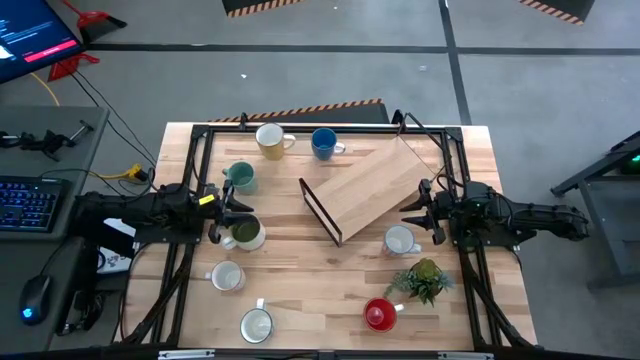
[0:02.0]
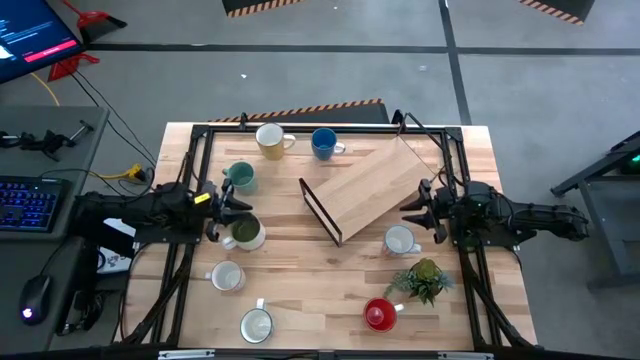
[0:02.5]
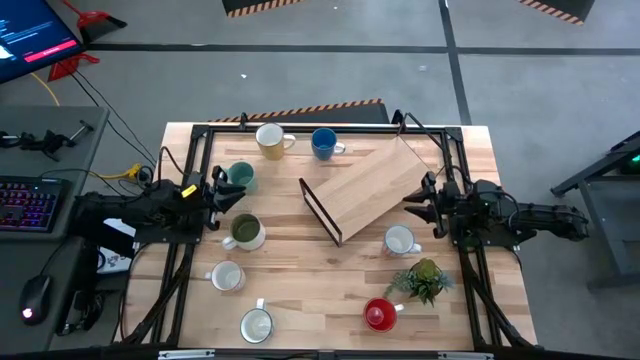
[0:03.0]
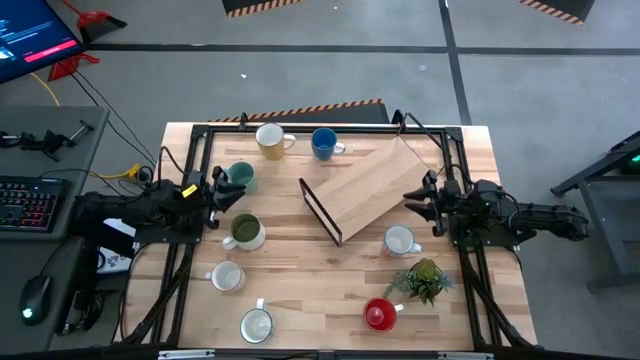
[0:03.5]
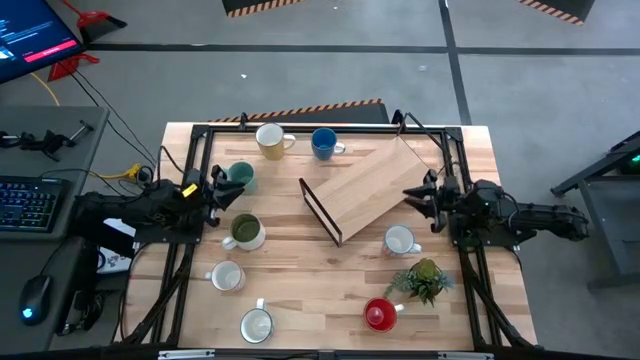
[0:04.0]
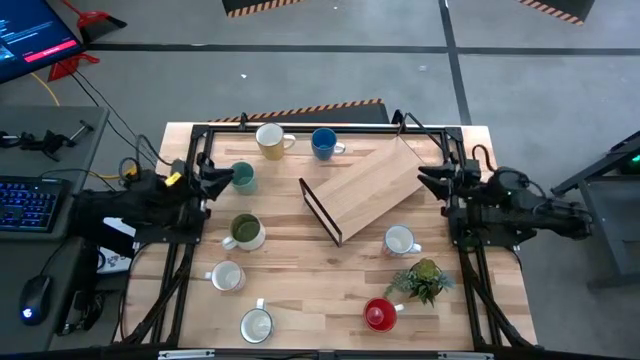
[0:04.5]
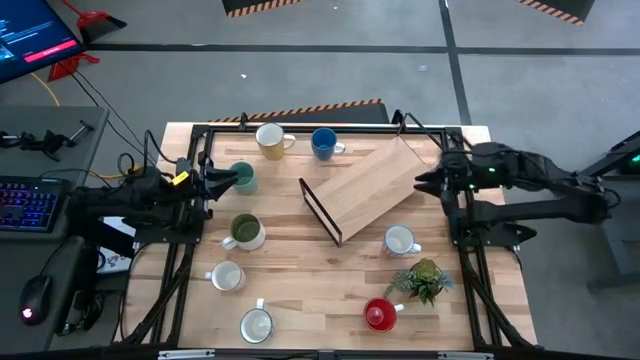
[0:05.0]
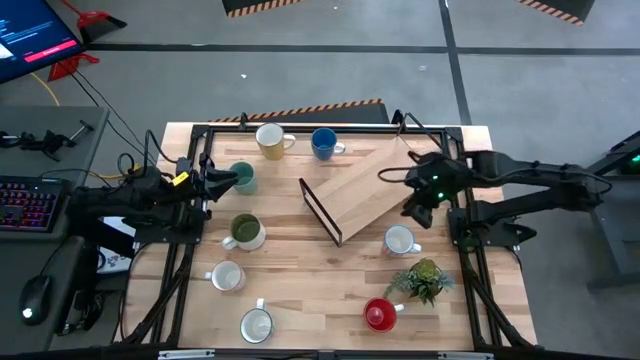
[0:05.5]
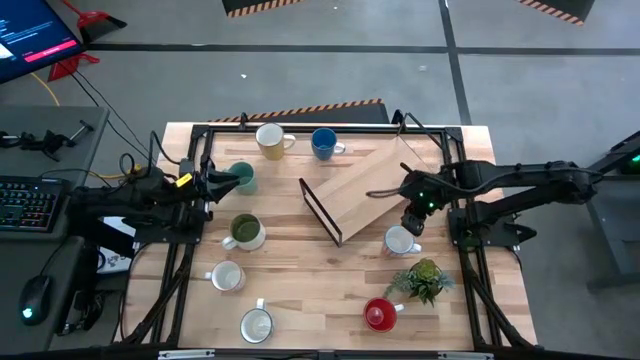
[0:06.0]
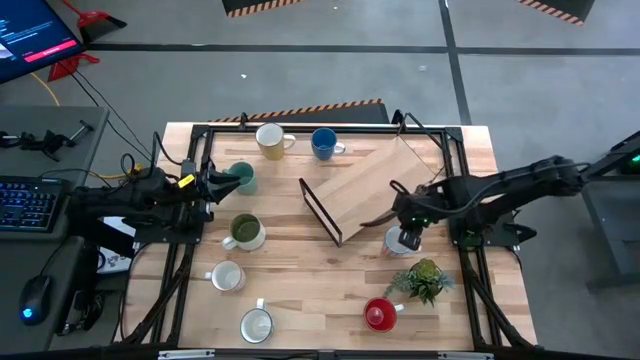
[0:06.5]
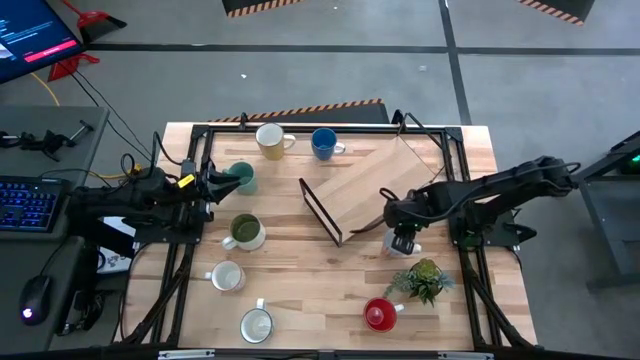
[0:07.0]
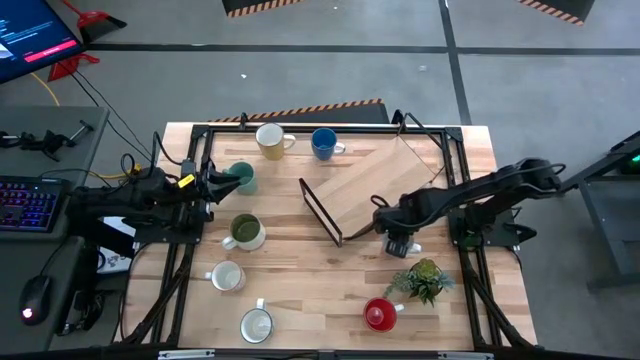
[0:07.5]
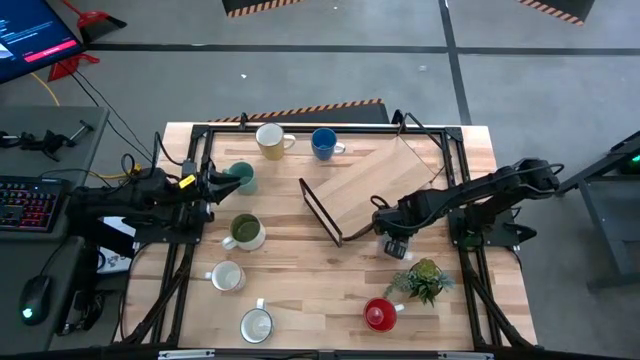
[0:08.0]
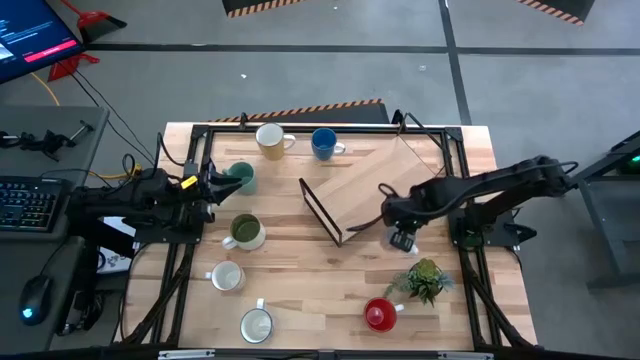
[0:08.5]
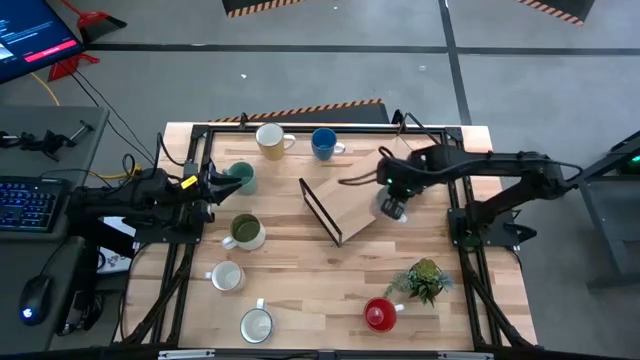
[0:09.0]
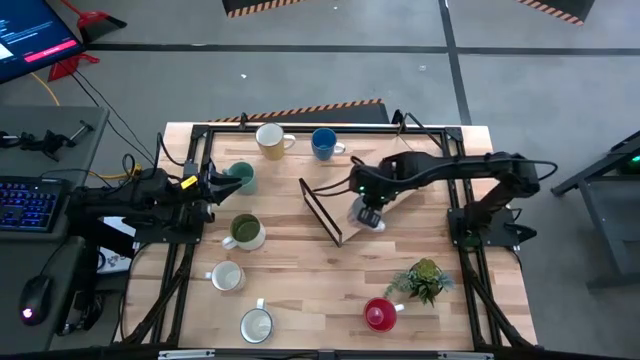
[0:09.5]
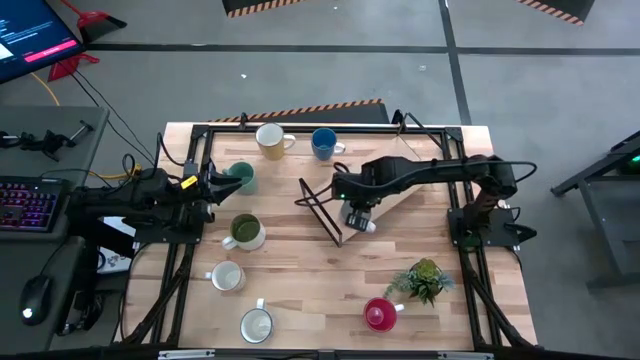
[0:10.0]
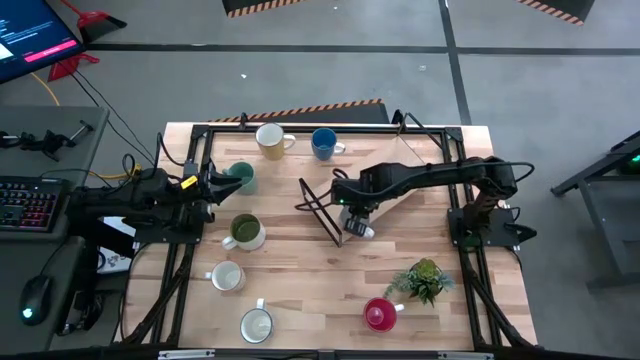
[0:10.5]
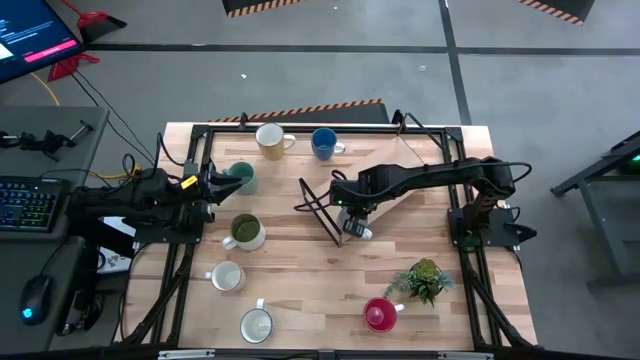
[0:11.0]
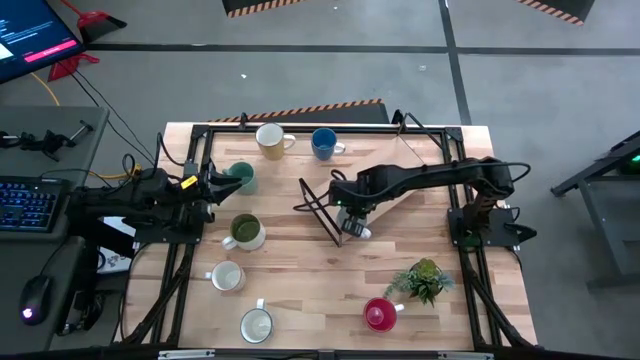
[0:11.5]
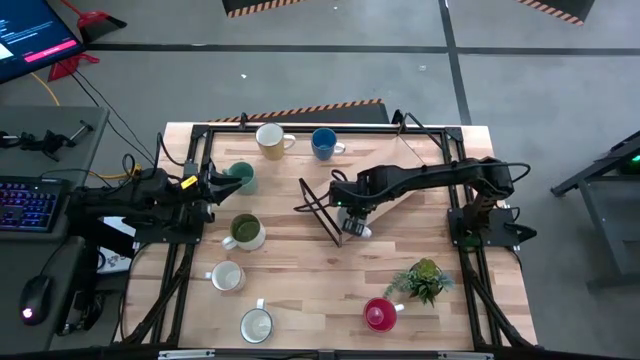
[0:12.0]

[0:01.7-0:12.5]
Task: Place coffee mugs
Put the red patterned mug on the shelf

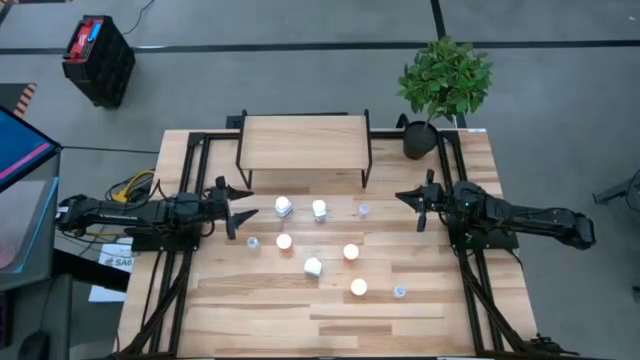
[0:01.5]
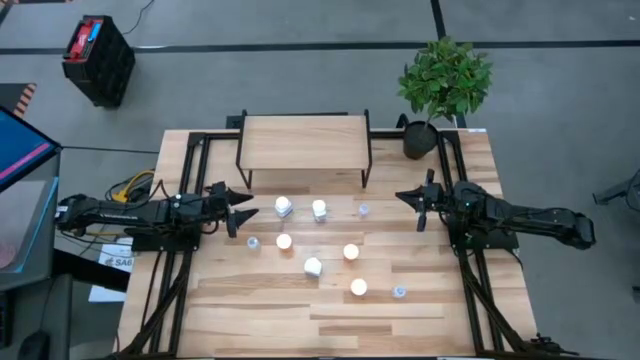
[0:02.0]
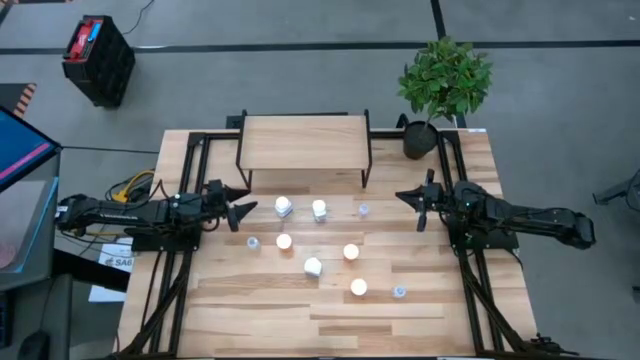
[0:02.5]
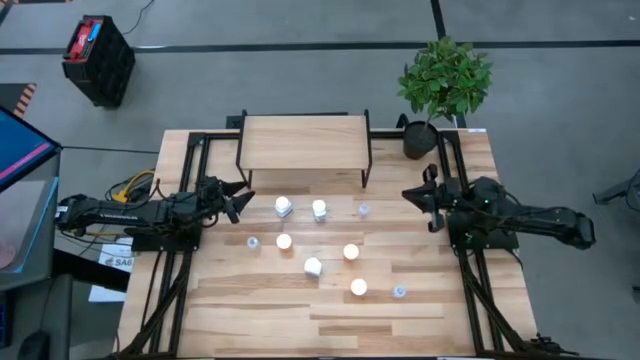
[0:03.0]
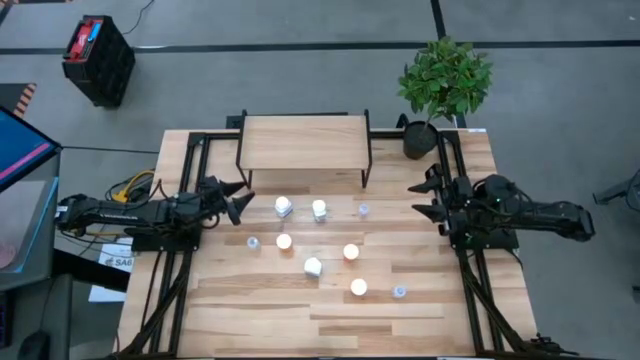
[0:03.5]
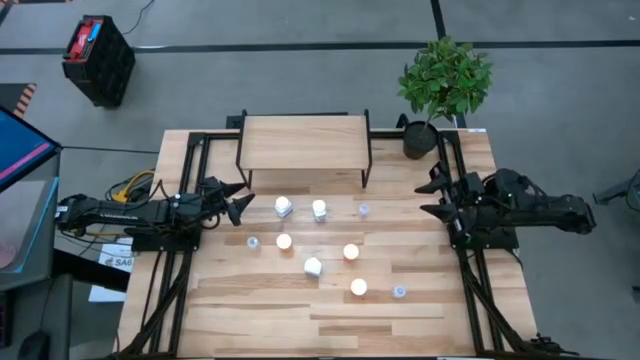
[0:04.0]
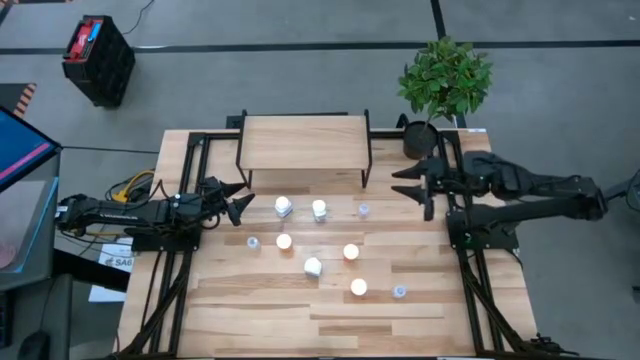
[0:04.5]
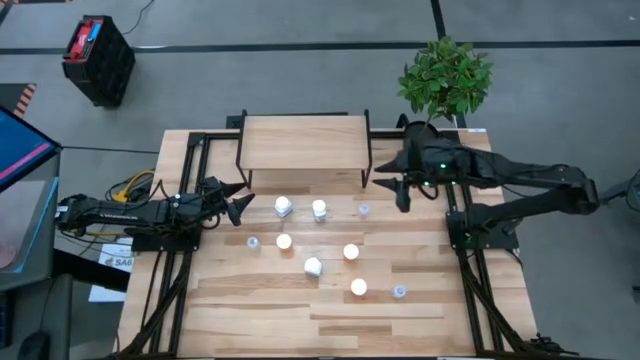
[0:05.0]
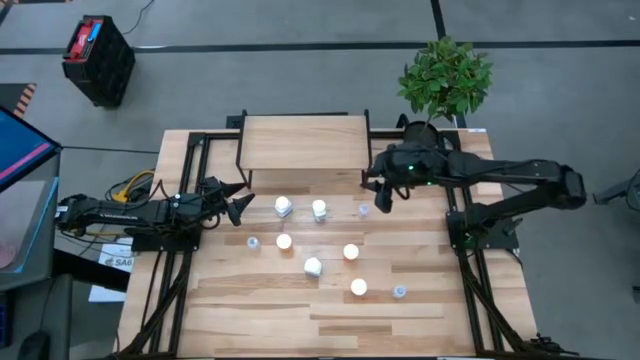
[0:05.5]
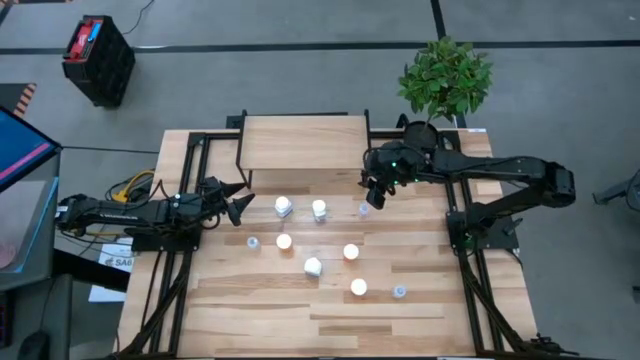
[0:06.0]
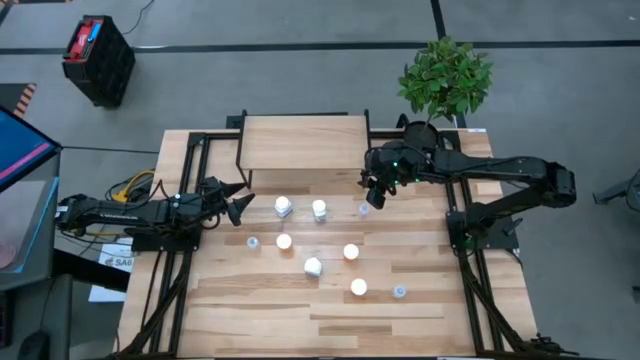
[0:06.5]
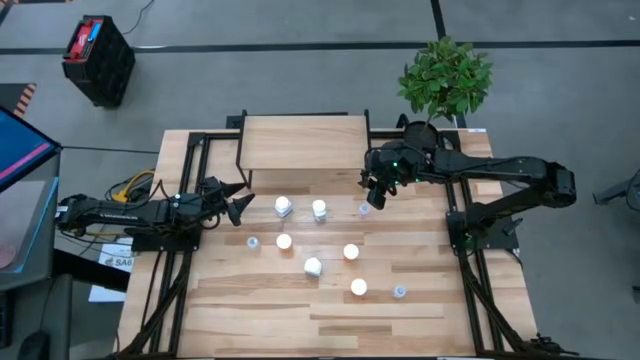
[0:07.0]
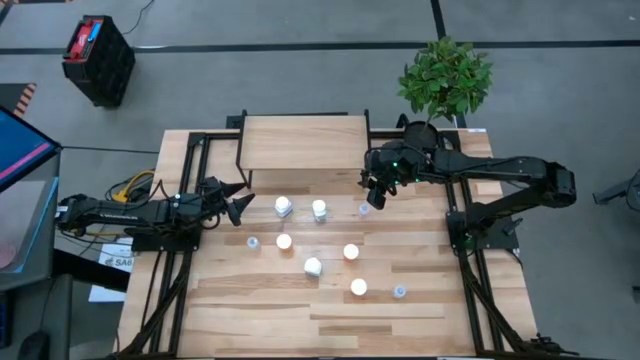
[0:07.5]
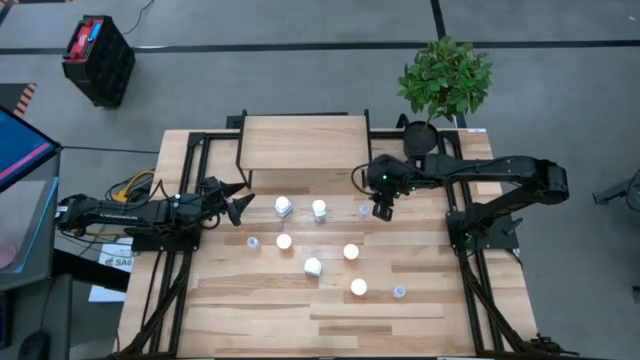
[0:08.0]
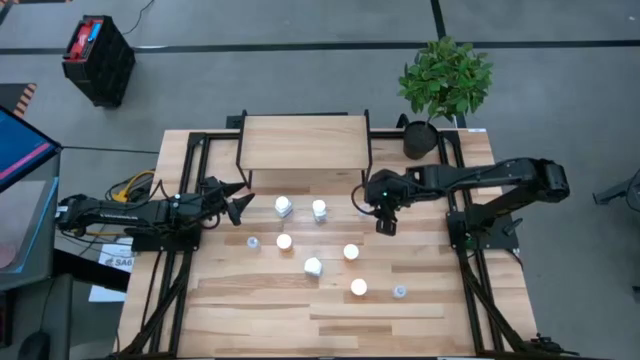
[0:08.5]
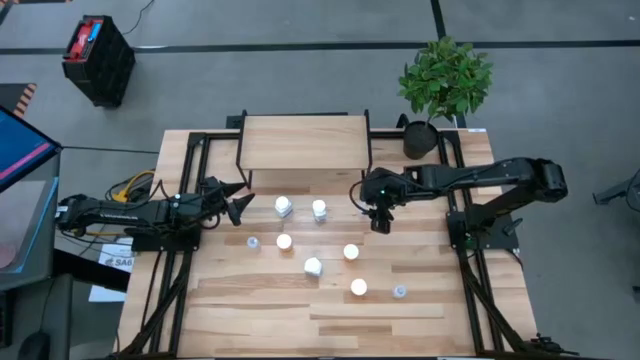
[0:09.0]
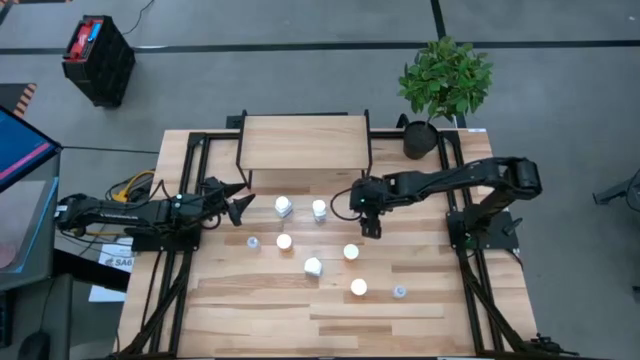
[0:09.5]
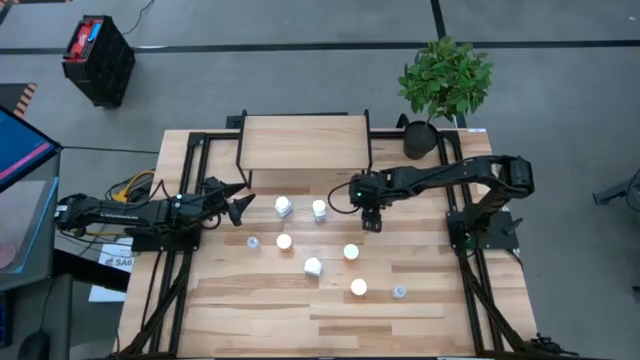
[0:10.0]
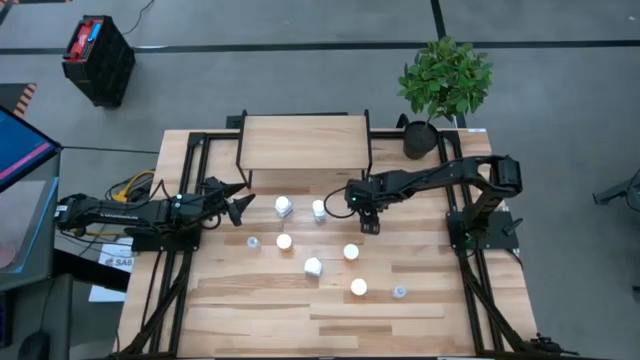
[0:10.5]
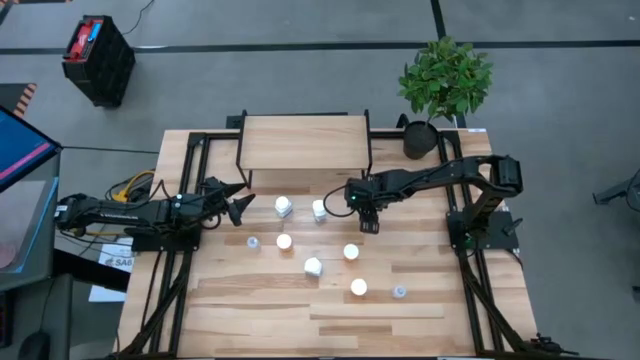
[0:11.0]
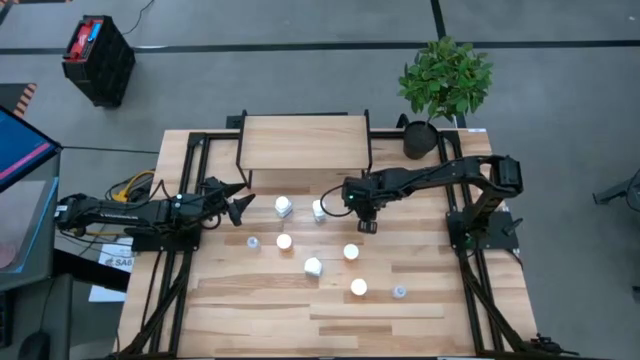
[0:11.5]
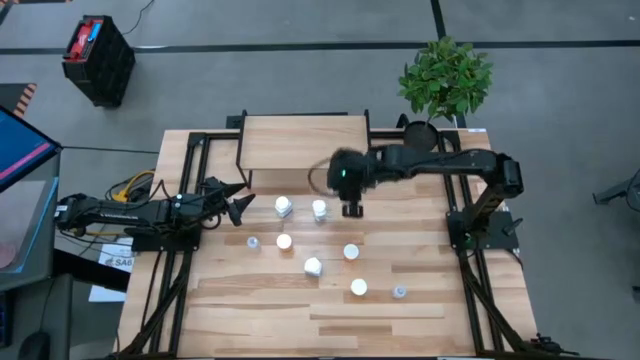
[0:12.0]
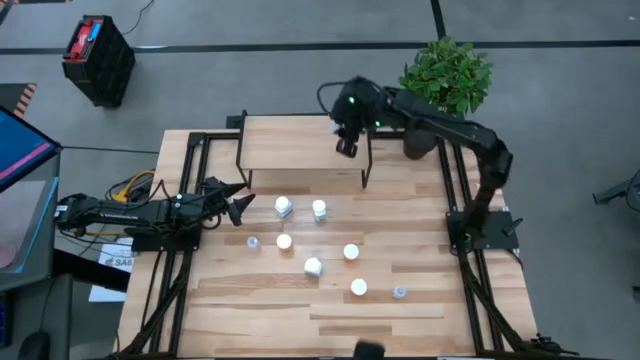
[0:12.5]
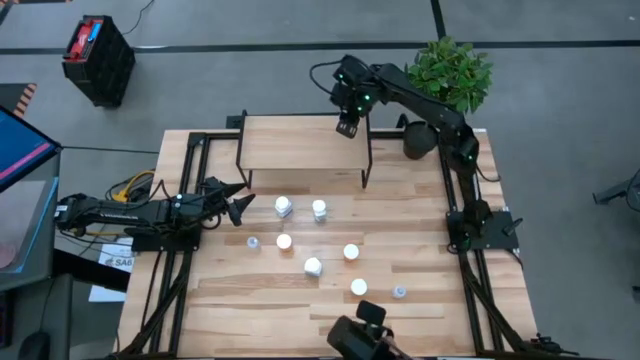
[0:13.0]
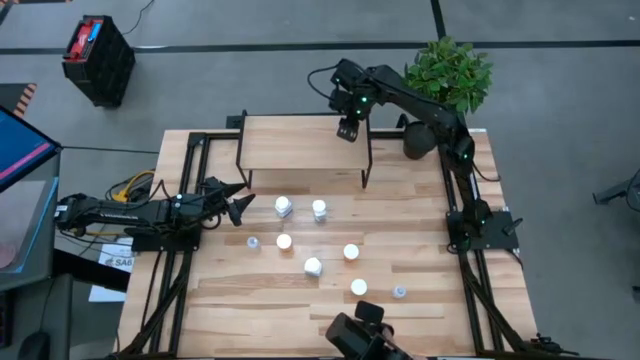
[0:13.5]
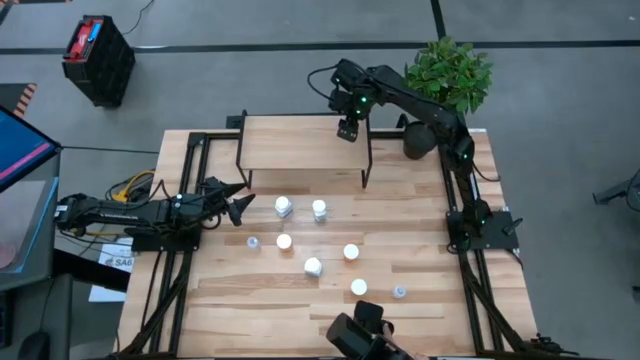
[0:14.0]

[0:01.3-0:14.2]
Task: Pick and place medicine bottles onto shelf by color
Put the top right transparent pill bottle on the shelf
